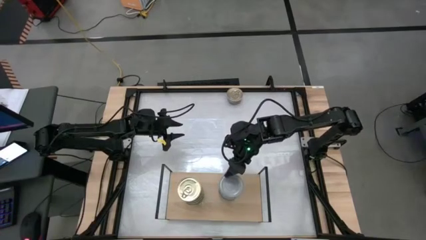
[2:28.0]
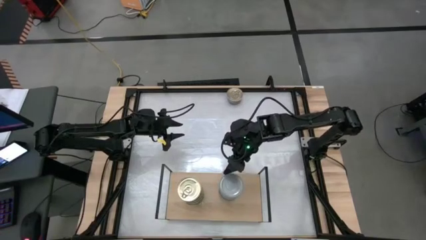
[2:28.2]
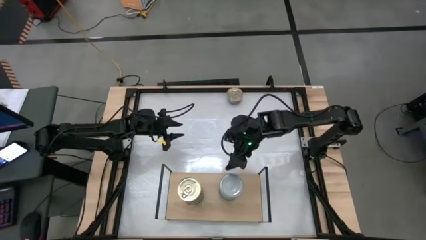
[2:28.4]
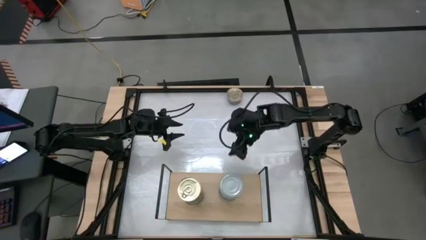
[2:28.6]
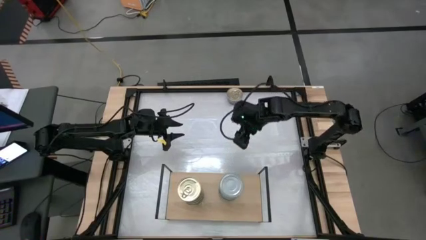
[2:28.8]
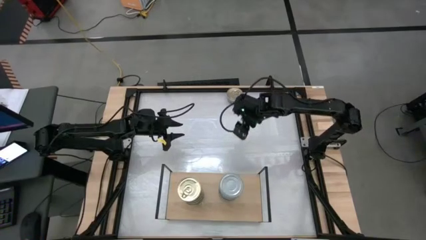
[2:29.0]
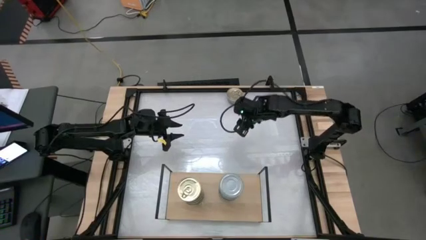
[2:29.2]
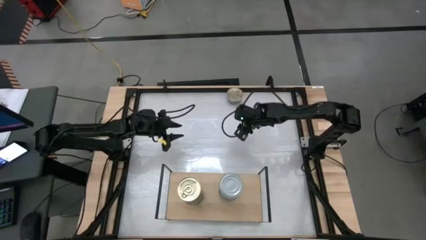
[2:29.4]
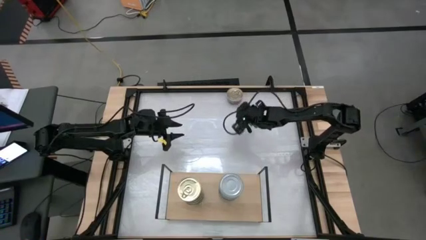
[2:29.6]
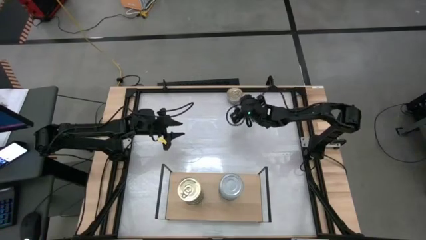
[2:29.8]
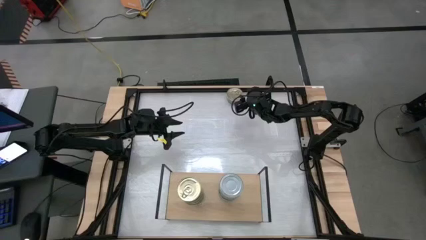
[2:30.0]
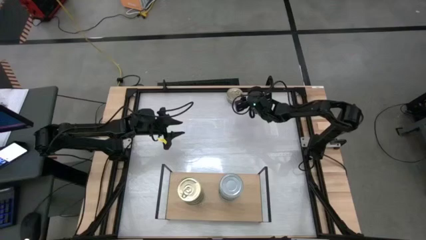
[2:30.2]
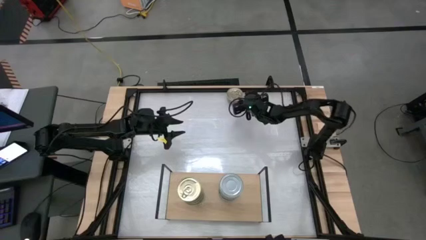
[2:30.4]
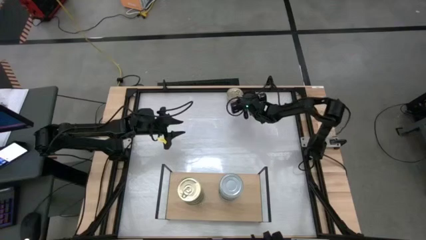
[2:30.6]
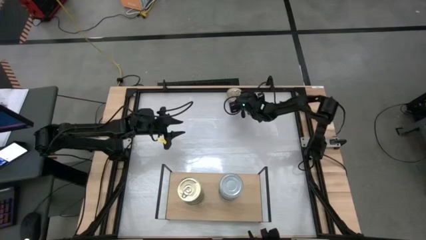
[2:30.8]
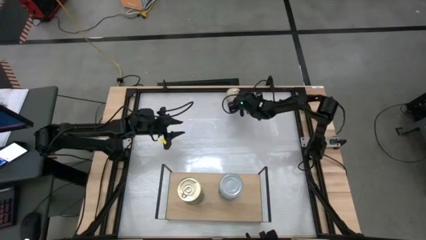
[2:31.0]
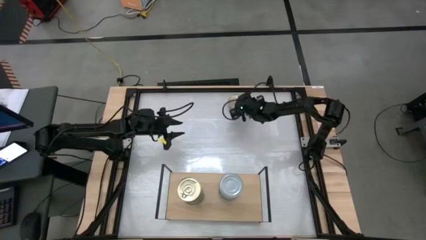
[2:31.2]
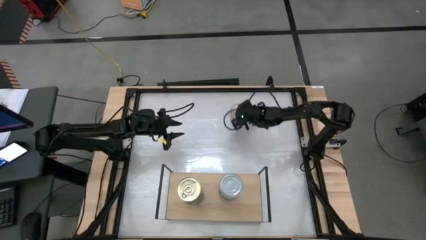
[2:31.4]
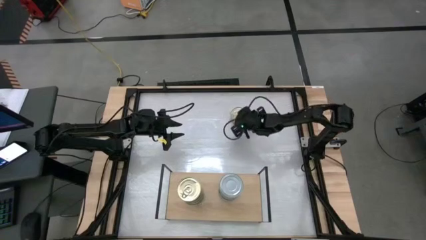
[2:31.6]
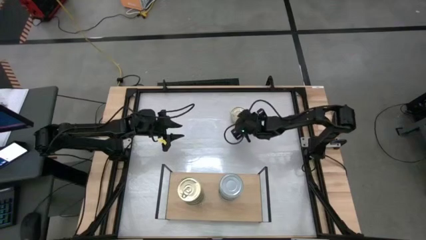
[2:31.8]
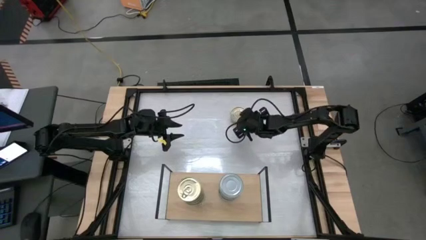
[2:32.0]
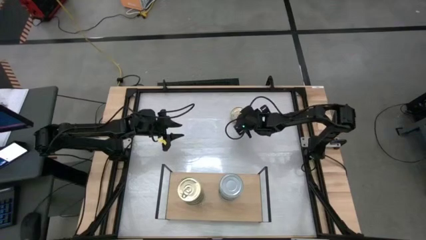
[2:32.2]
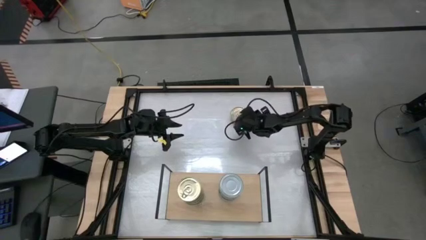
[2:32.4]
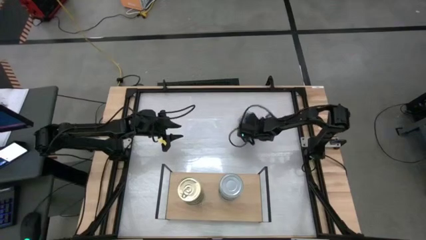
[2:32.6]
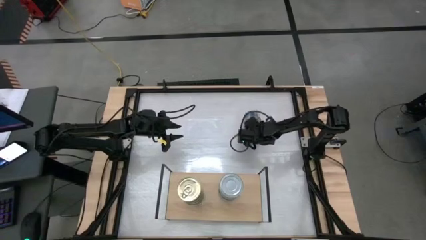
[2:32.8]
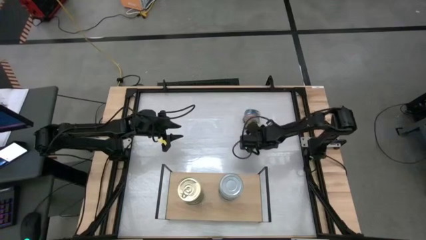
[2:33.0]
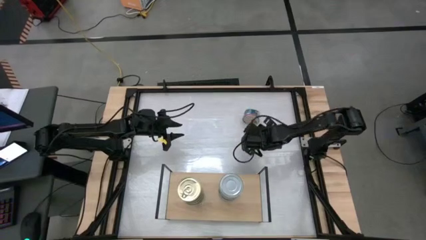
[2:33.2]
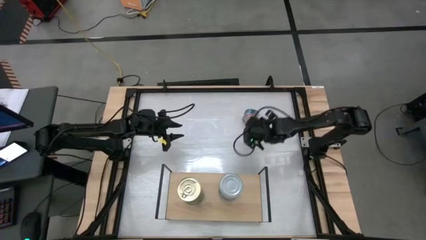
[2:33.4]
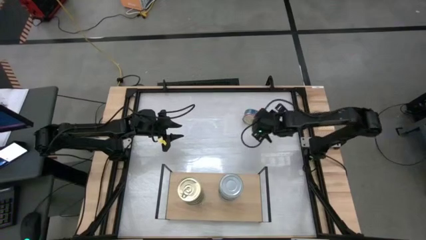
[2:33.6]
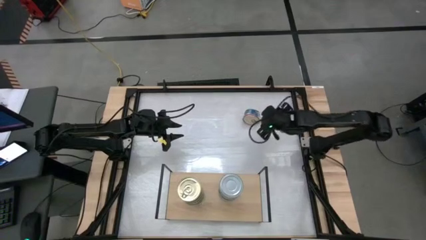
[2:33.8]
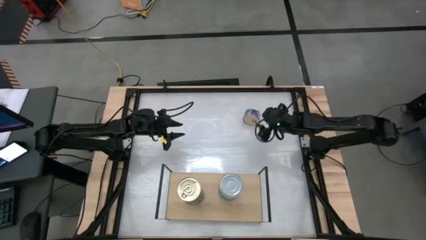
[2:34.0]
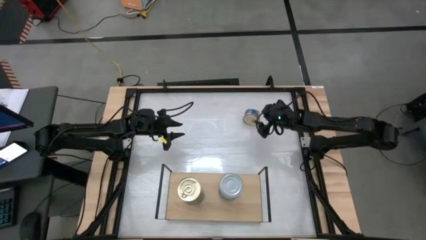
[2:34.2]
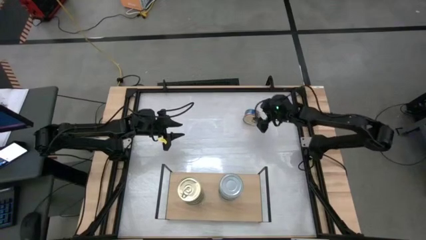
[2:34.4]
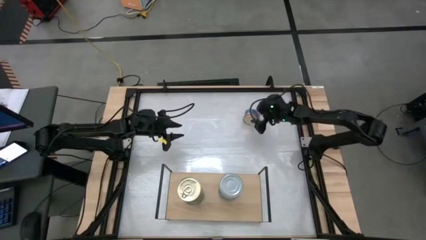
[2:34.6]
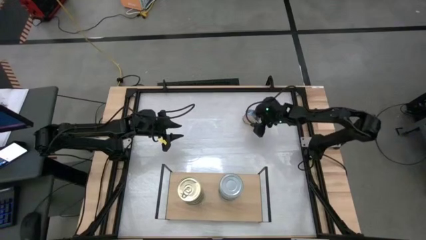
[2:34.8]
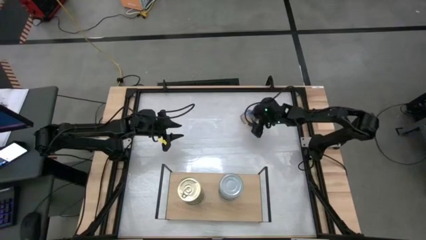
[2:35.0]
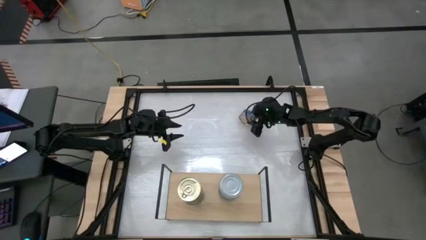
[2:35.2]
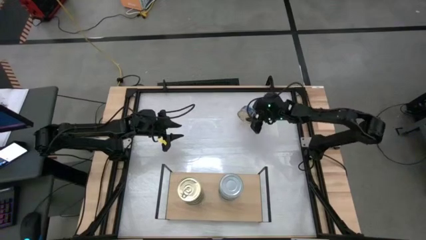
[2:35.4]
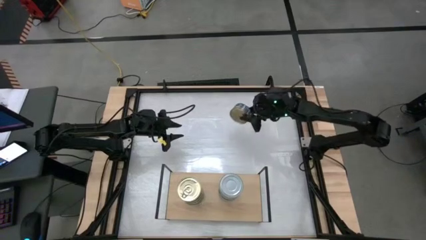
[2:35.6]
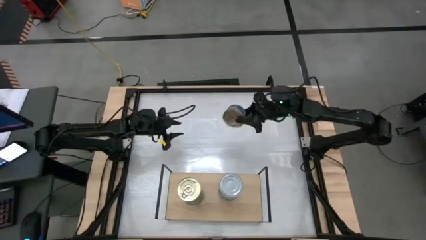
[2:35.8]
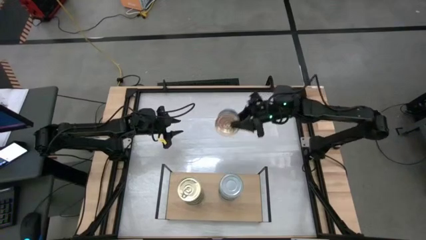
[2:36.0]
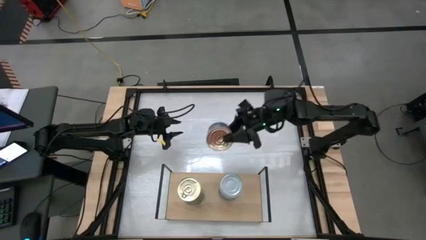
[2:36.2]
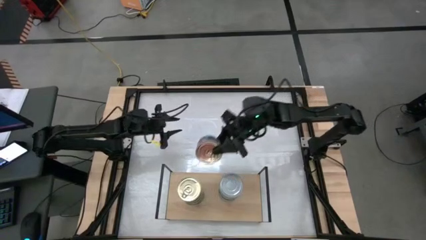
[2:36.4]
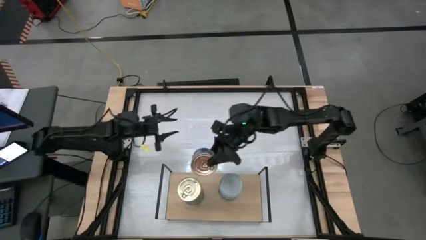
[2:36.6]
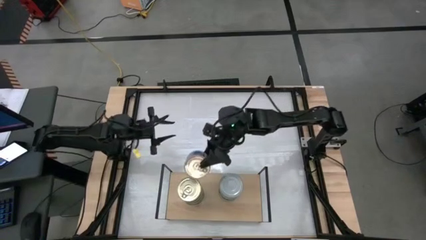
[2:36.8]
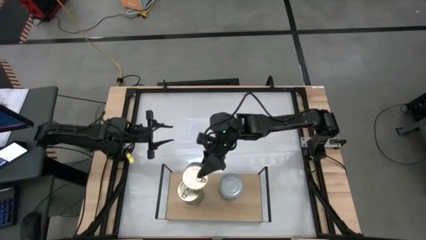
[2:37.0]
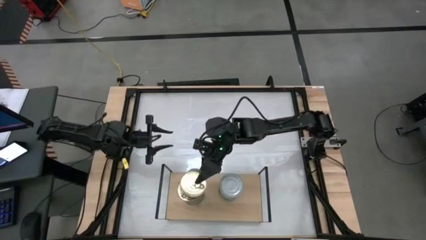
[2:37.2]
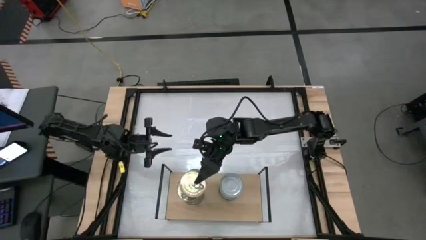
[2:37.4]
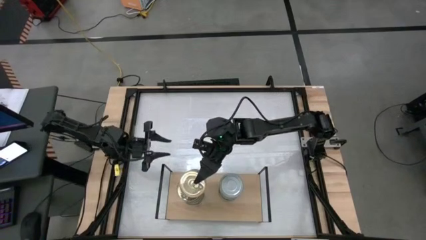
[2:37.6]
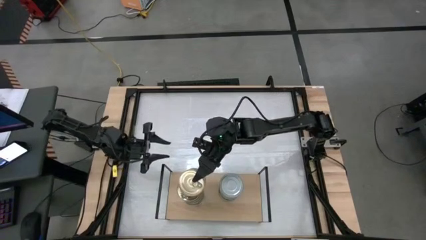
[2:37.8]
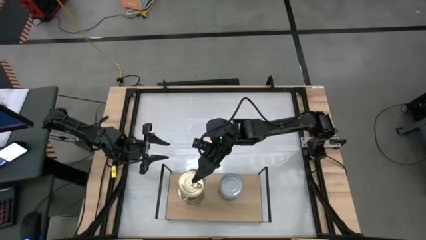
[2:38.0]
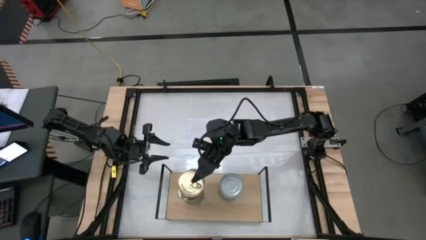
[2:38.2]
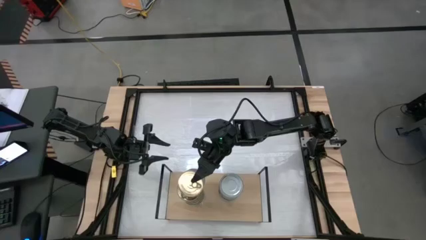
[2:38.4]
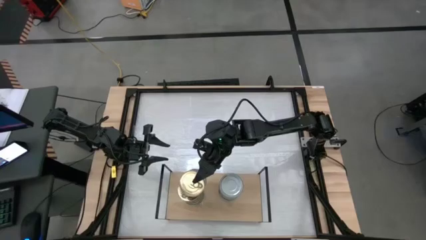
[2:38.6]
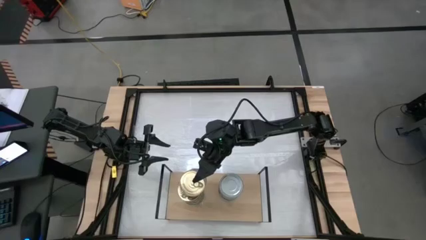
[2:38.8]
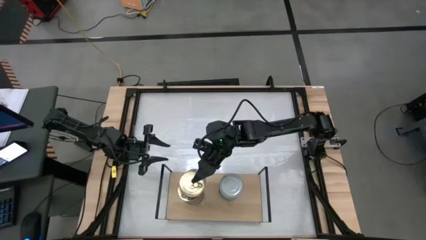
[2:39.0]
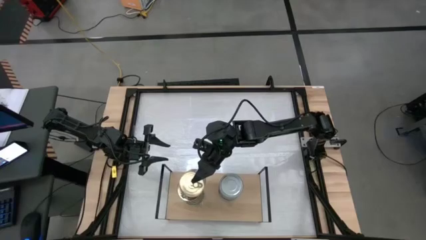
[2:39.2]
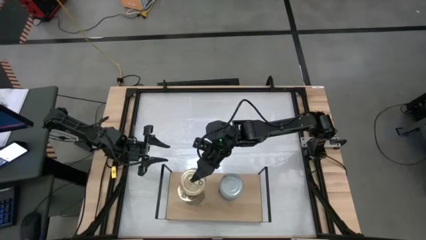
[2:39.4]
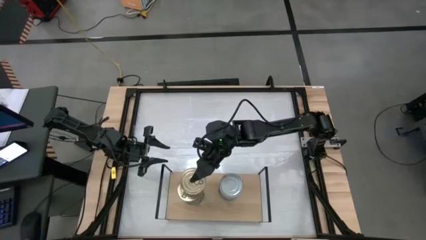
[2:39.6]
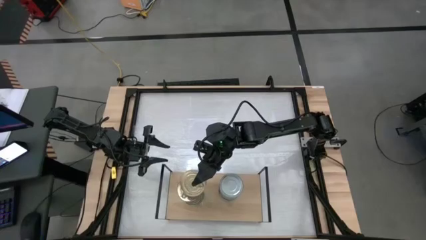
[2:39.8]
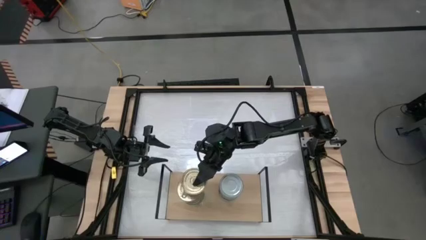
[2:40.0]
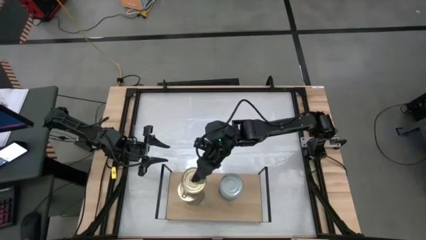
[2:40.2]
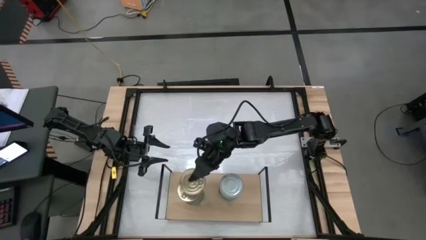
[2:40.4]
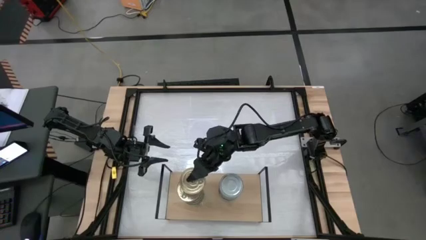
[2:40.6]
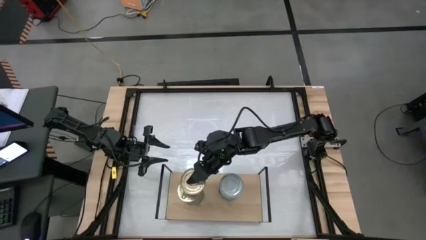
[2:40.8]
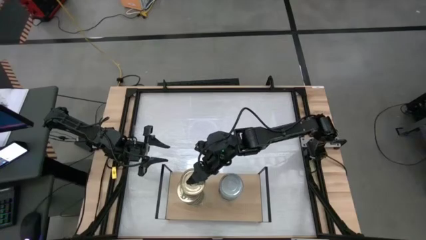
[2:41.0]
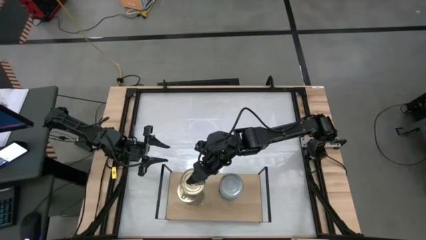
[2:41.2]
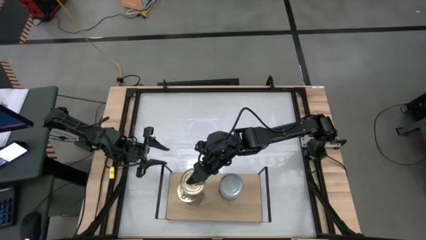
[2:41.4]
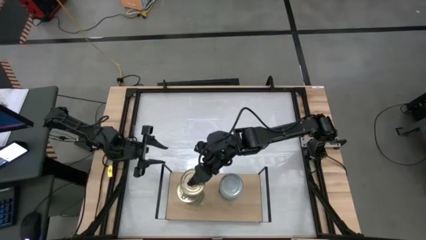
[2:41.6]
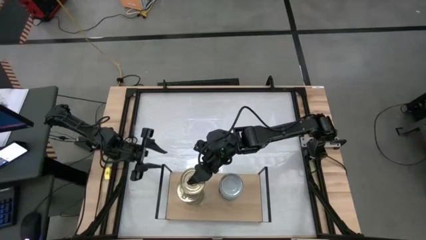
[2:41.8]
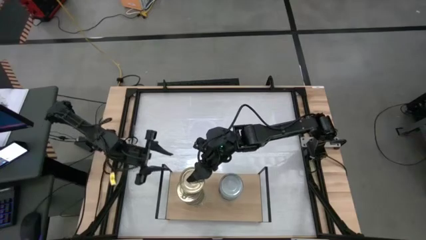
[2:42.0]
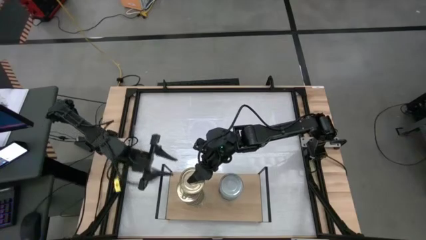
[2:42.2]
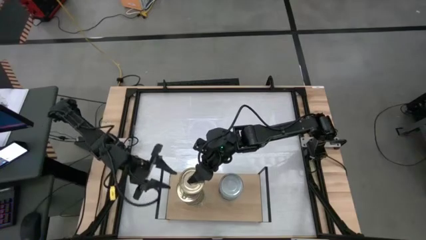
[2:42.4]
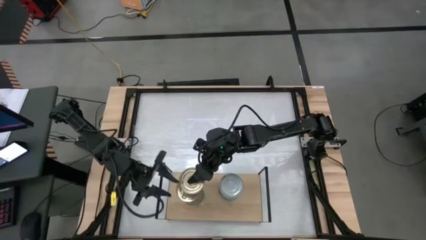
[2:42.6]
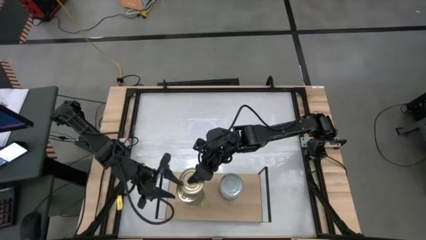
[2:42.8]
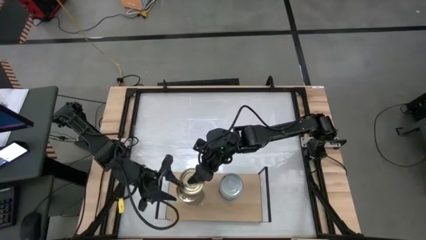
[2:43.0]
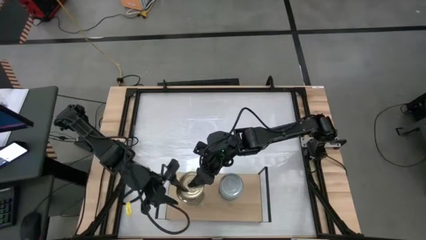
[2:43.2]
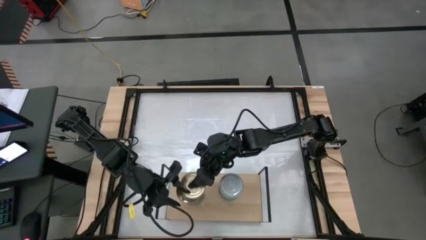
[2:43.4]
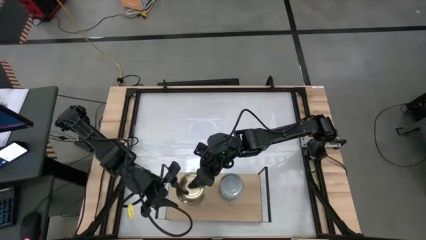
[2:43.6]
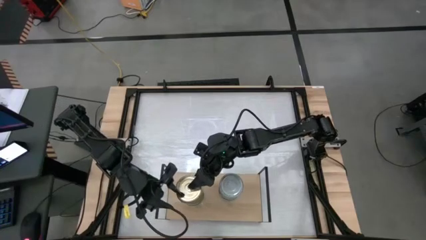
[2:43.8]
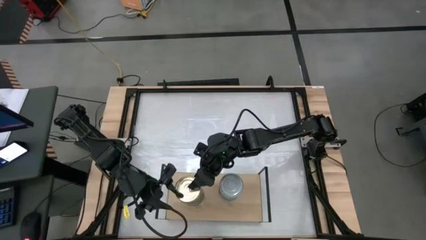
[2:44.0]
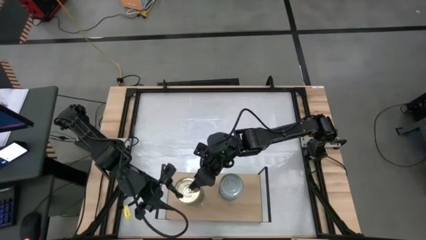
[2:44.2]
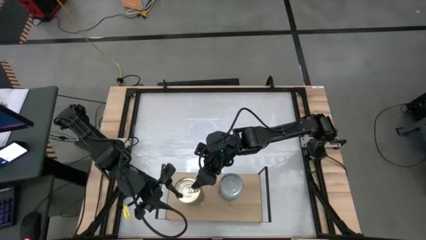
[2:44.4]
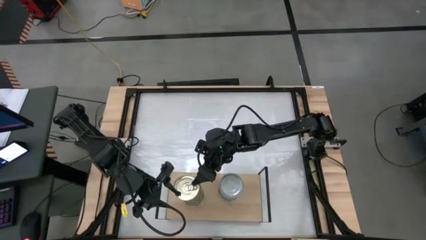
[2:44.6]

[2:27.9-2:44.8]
Task: Stack canned seafood by type on shelf
Stack the blue tuna can on top of the blue tuna can on the shelf
